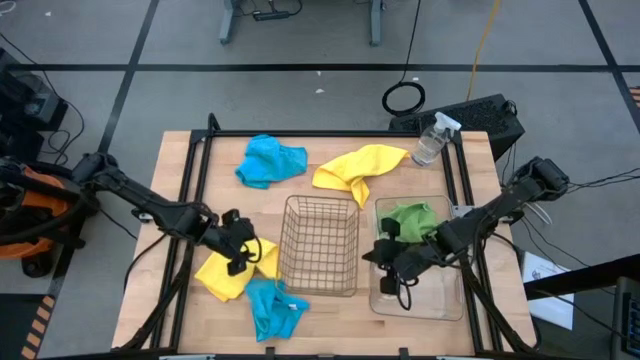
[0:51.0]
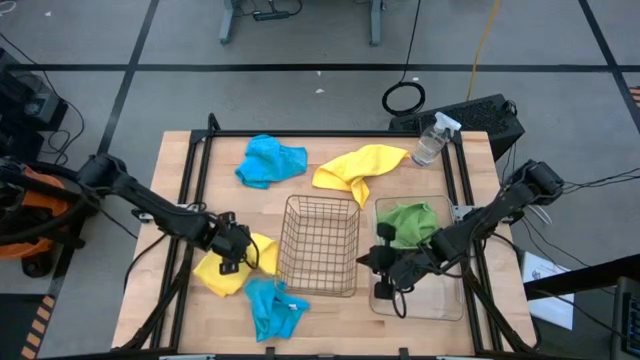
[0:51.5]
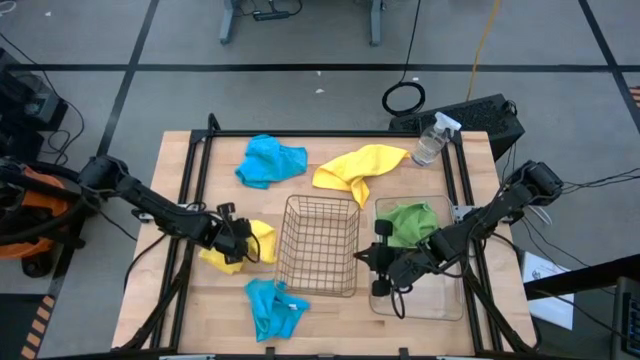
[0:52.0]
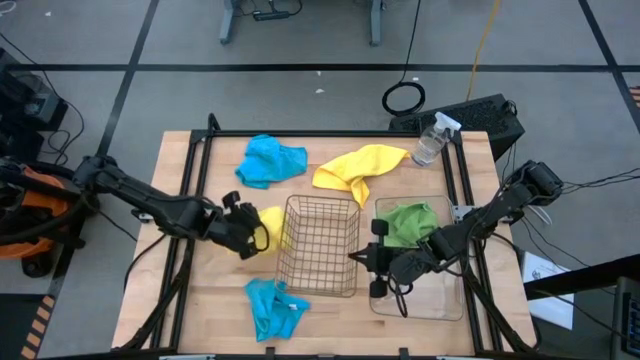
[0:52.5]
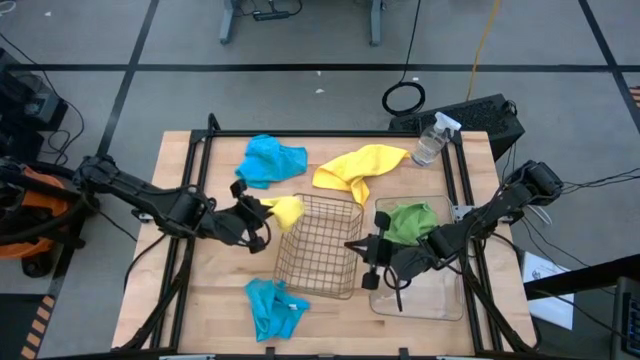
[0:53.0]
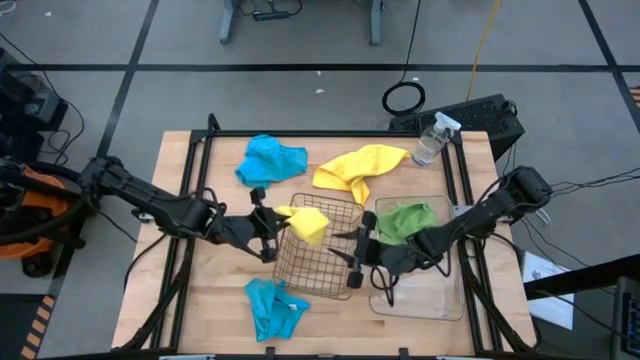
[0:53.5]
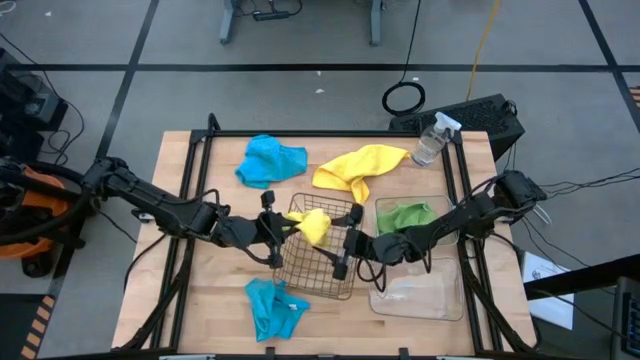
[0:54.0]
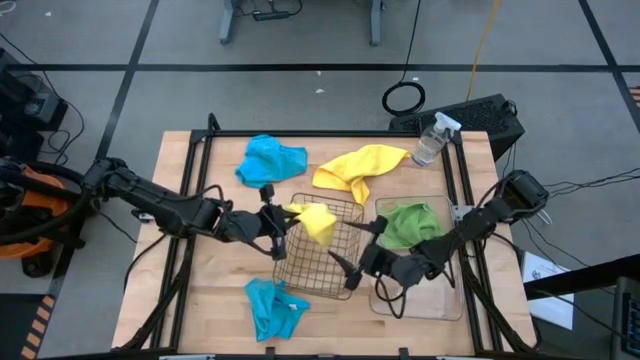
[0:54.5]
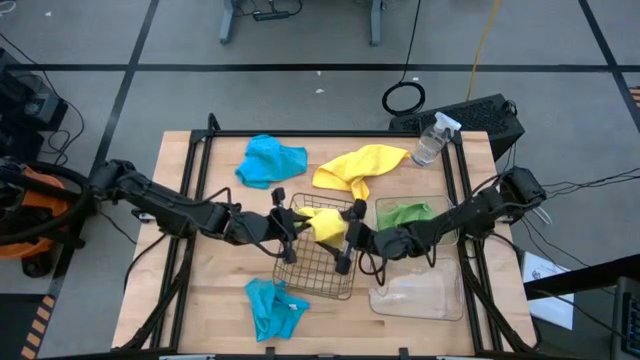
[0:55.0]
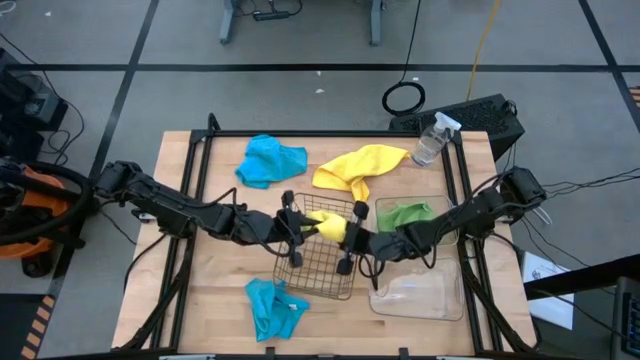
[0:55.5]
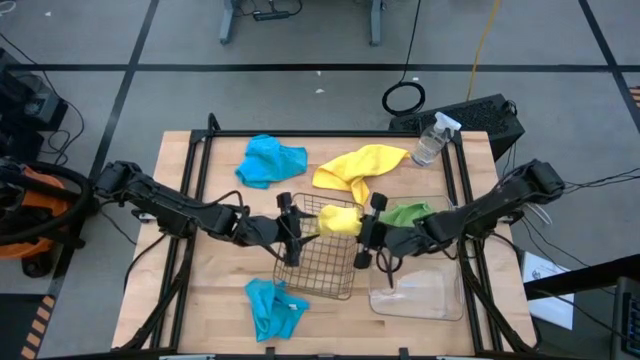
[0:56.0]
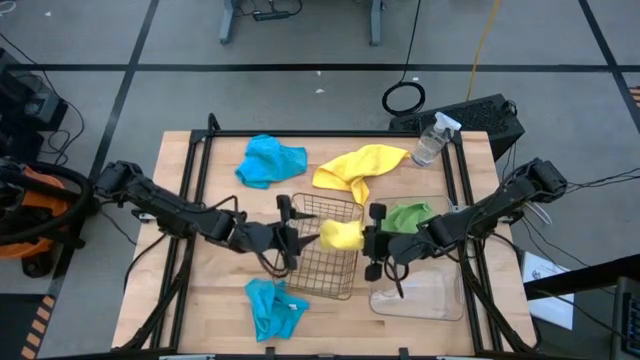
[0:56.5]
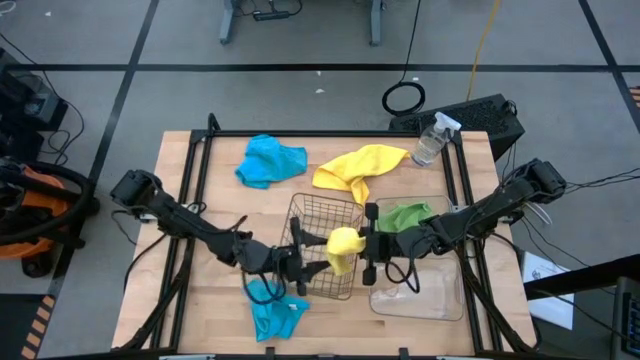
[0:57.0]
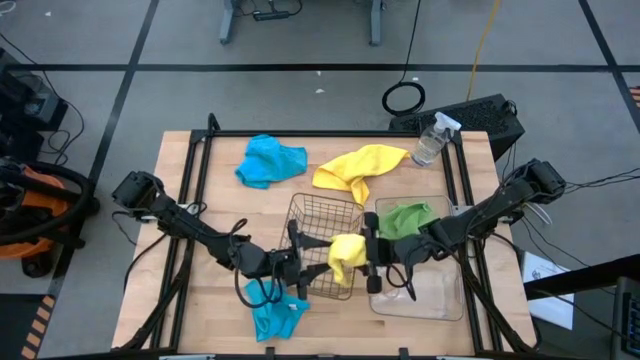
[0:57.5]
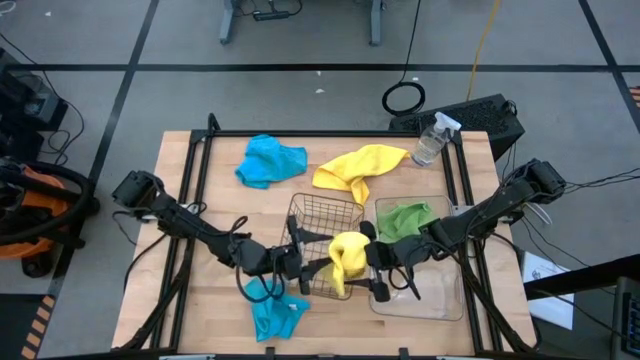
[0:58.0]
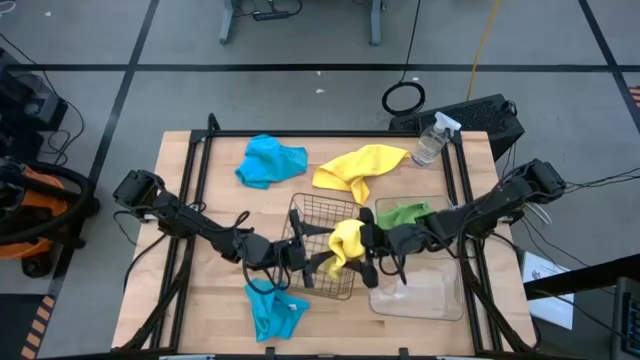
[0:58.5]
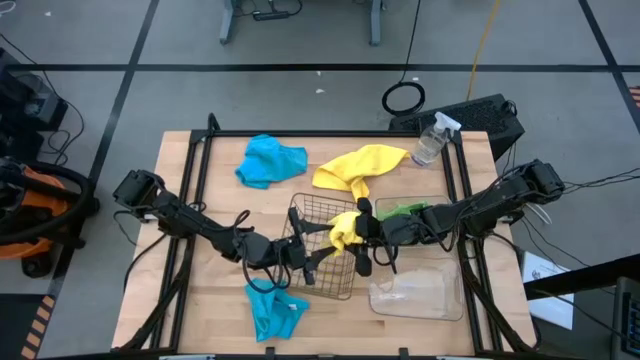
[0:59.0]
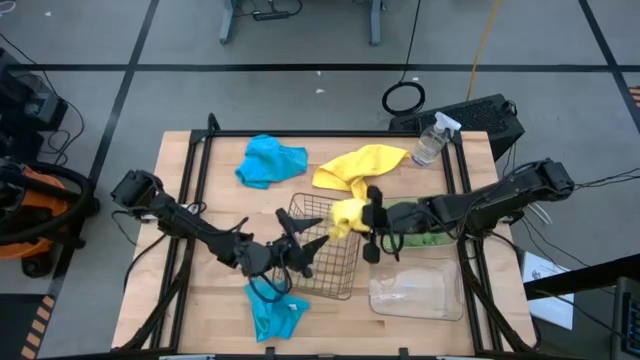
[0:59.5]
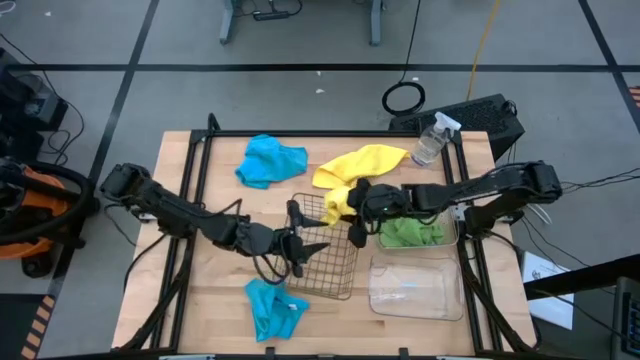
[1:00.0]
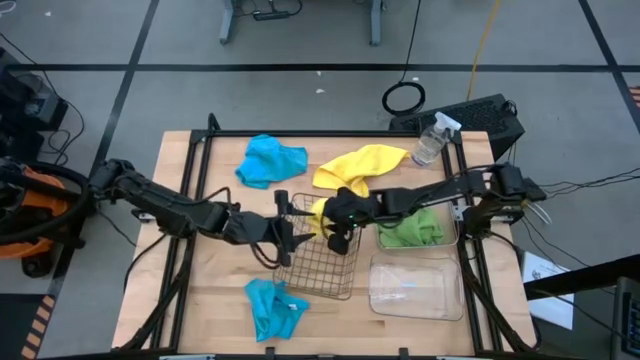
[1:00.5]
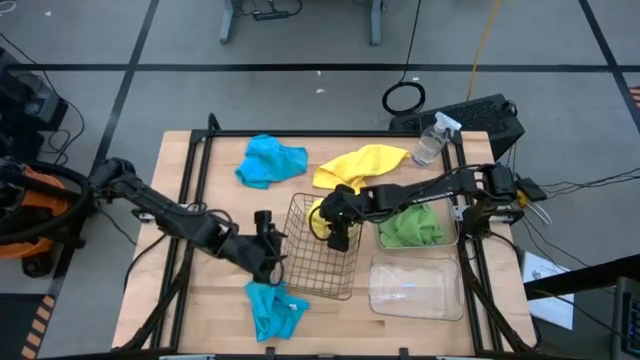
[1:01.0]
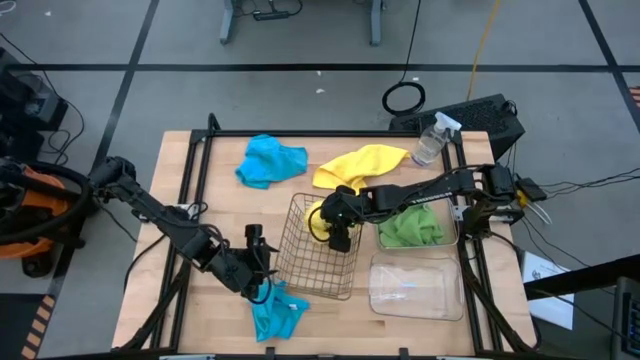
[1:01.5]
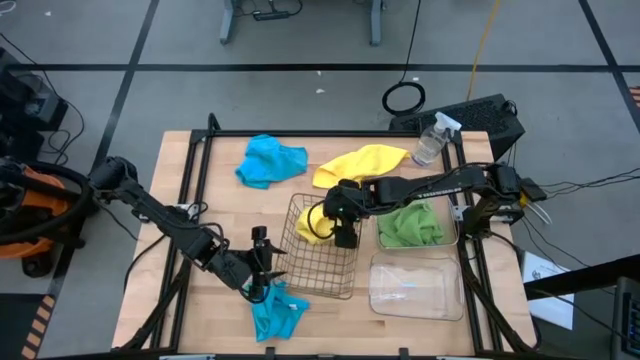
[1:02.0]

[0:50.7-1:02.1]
Task: Sort microfiber towel by color & place in baskets
Put the left yellow microfiber cloth into the wire basket

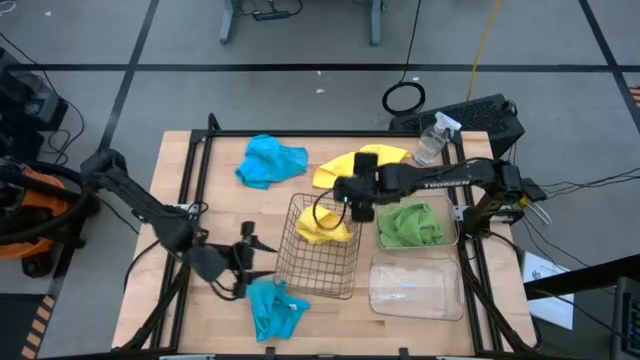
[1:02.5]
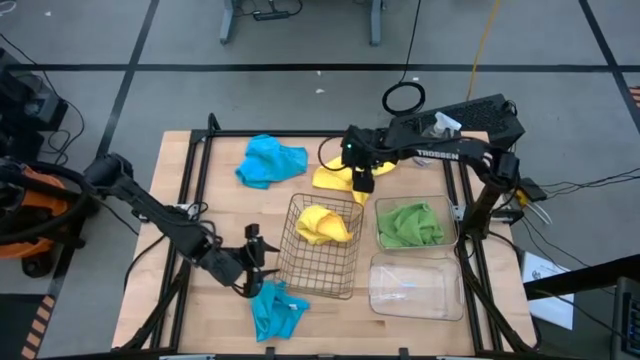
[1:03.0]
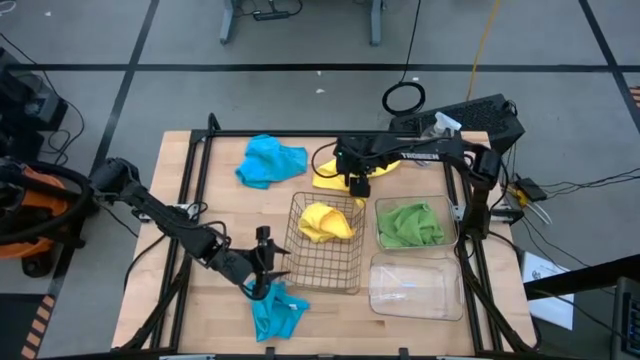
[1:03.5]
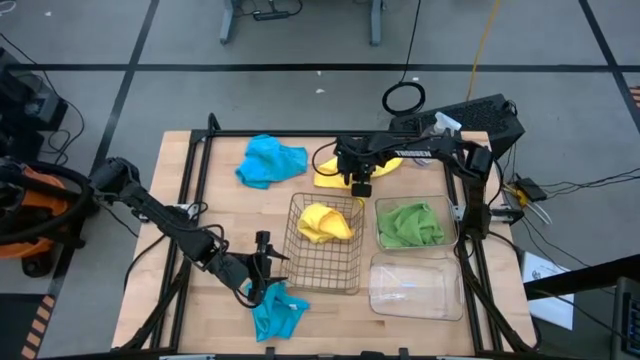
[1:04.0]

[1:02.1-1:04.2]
Adjust the wire basket

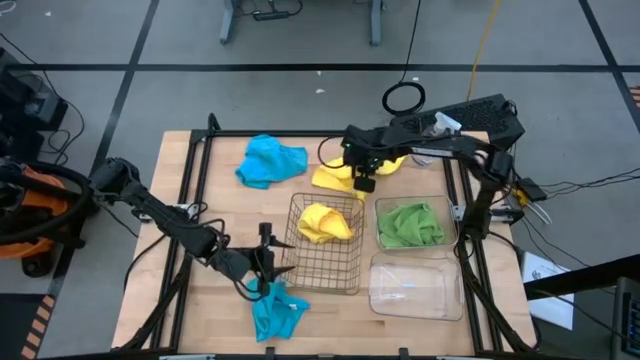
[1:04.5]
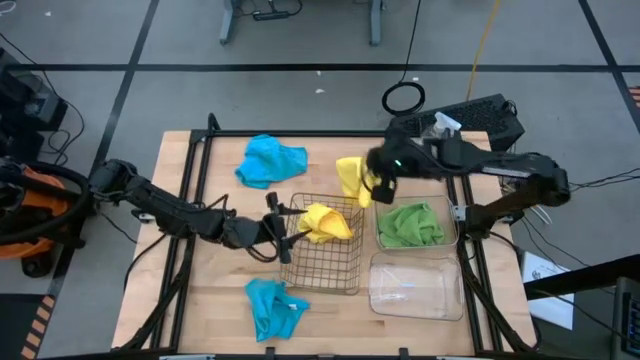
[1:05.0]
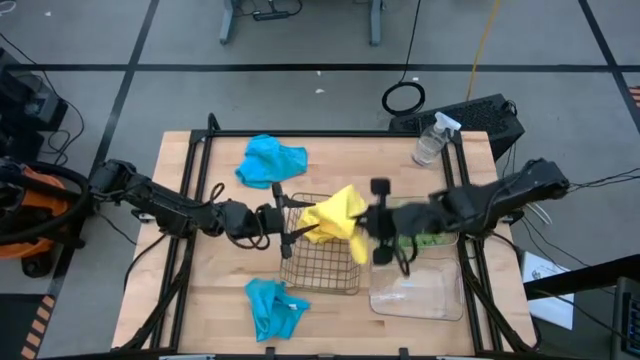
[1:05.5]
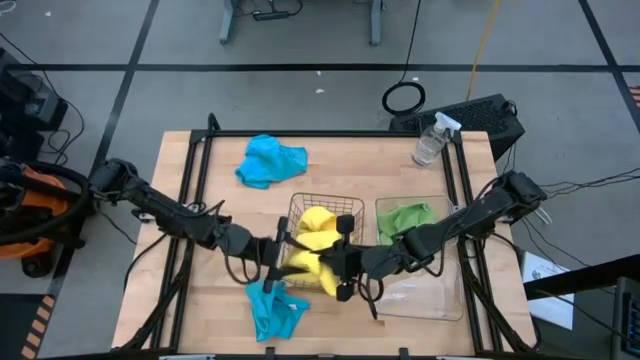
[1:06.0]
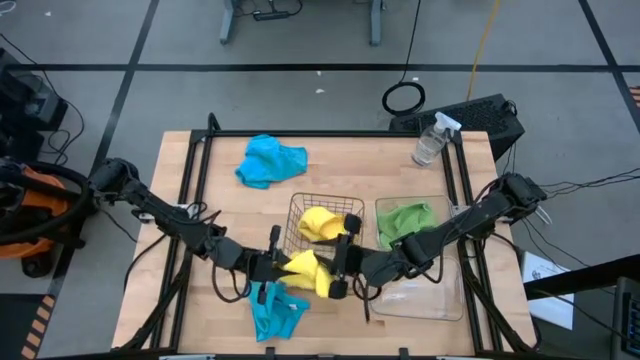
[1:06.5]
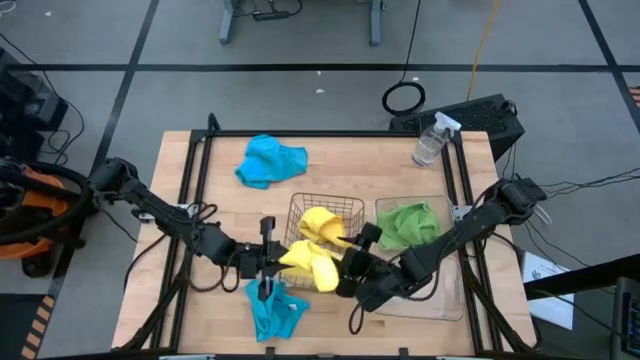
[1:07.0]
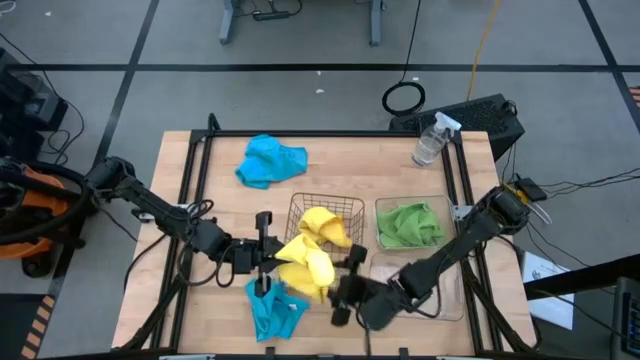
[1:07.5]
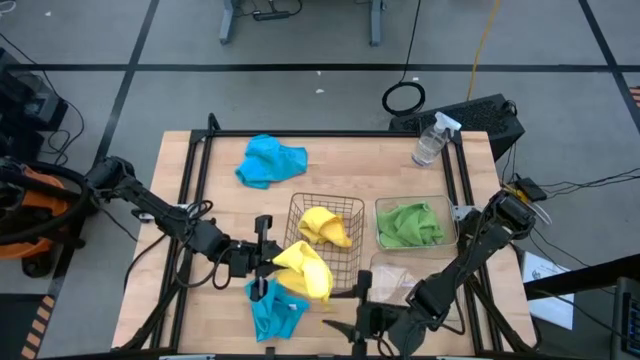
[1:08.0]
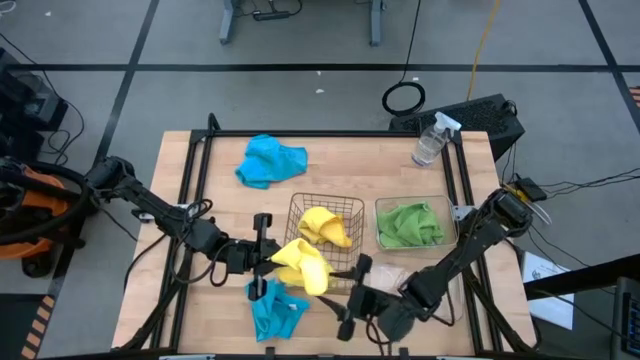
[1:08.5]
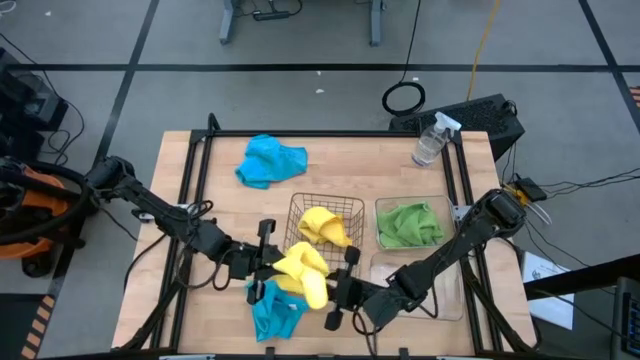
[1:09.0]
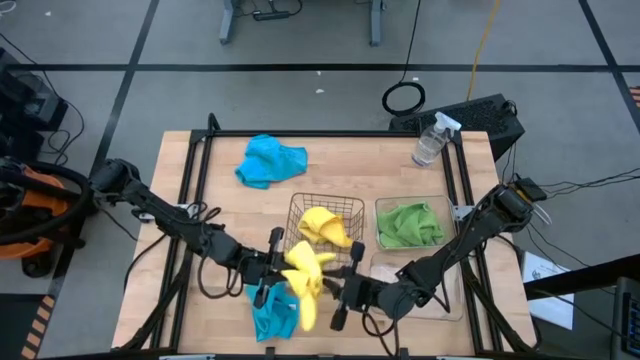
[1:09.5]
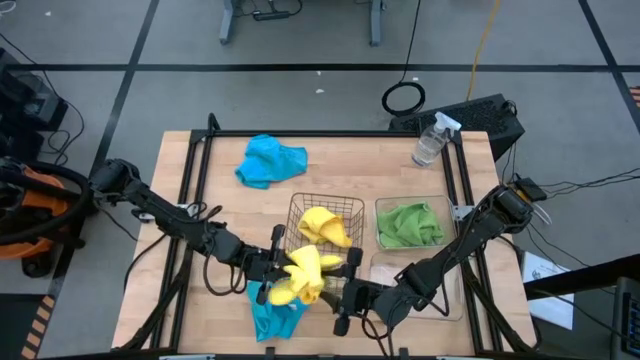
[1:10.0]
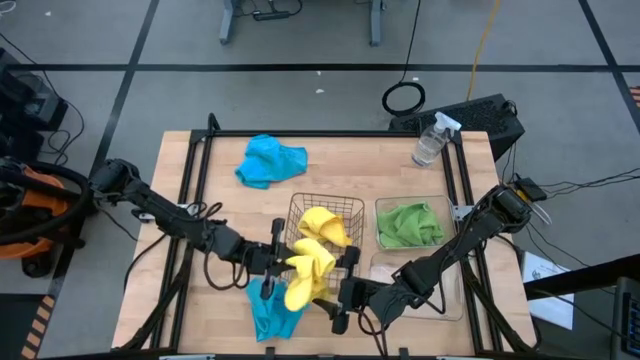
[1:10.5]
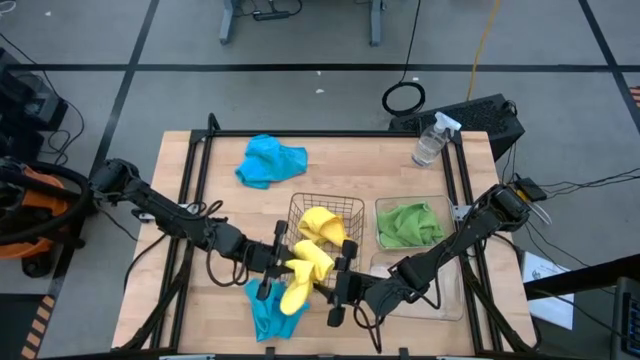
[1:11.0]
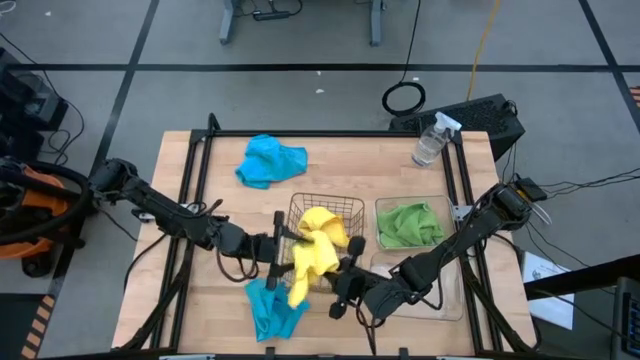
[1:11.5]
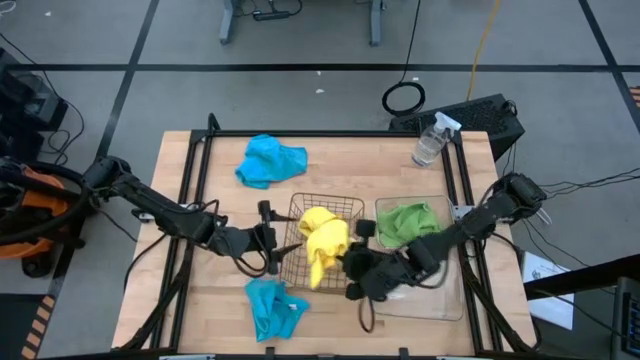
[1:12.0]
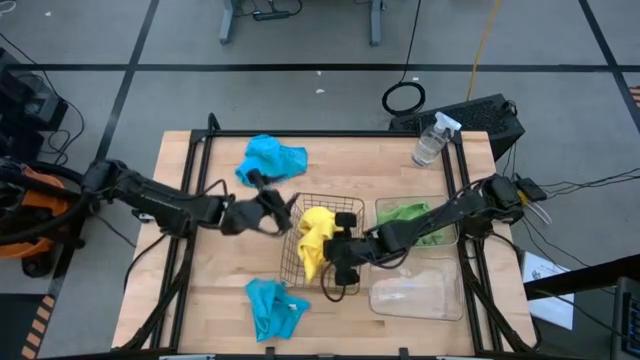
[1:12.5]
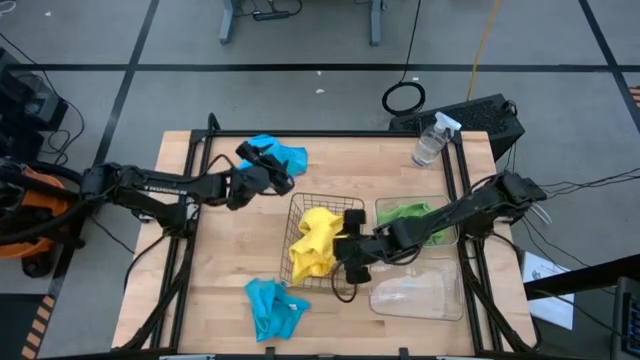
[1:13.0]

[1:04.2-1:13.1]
Put the yellow microfiber cloth into the wire basket
